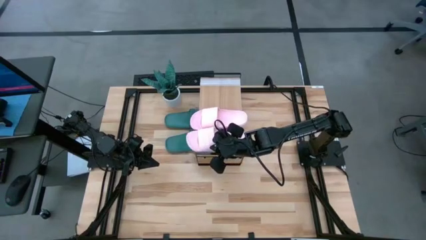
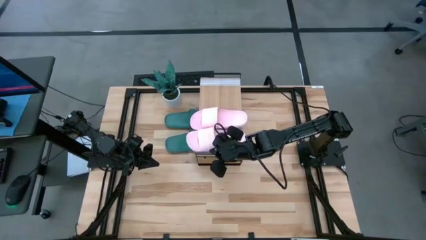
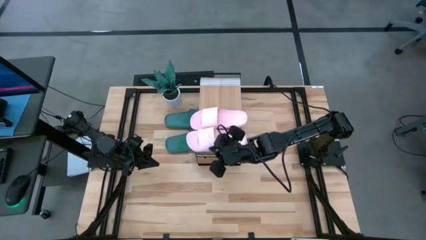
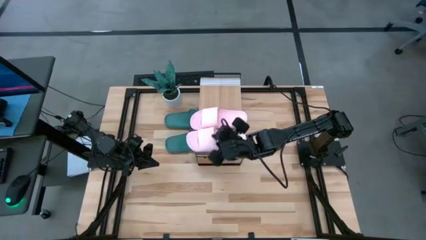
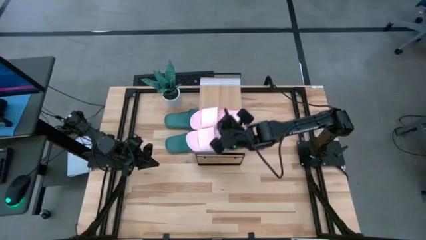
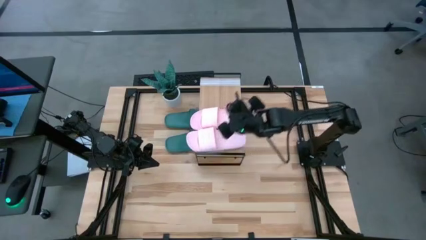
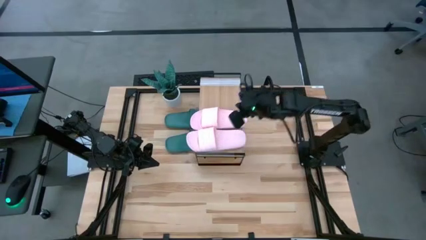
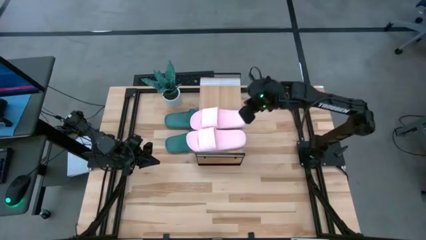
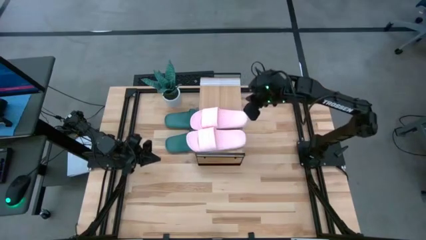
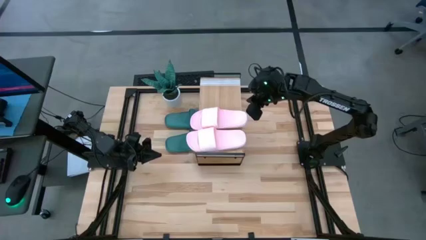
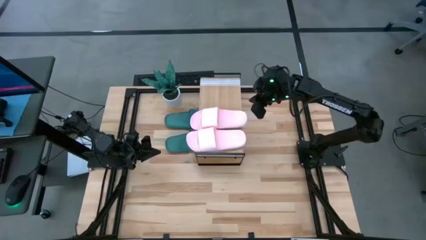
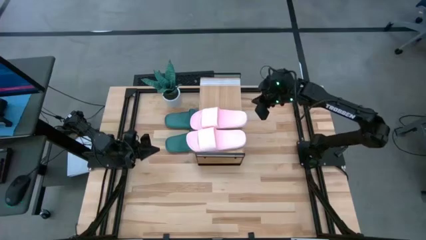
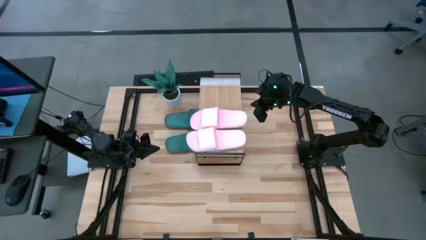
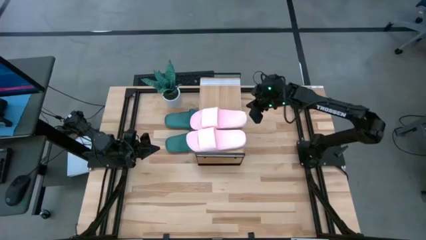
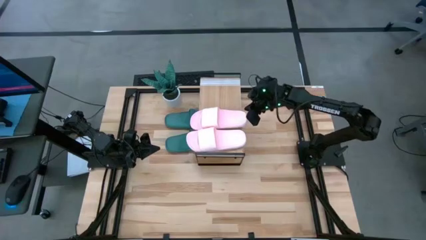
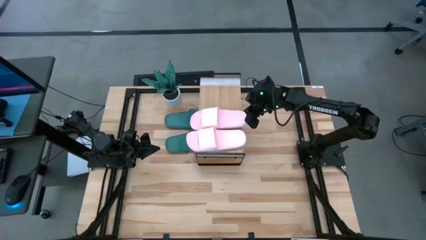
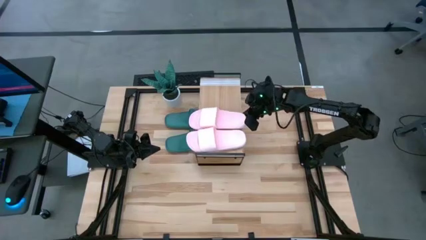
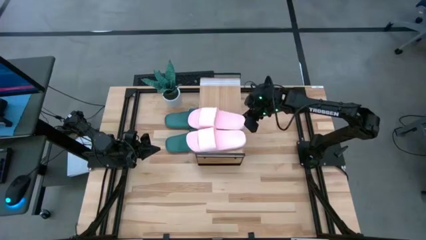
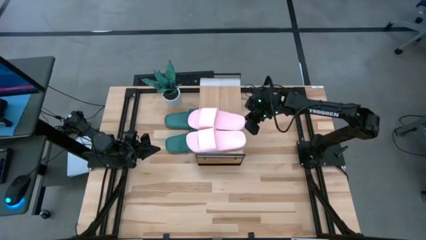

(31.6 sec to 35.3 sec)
Task: Pick and place slides into the shelf
Adjust the top pink slipper on the shelf

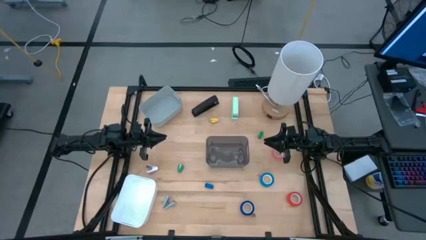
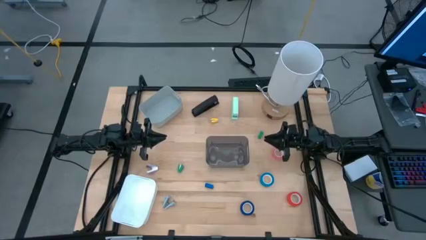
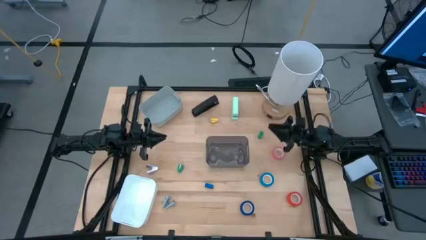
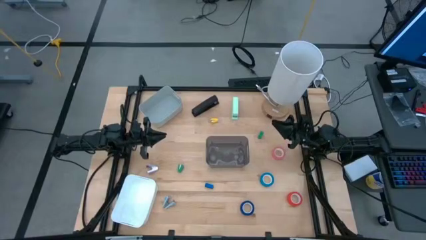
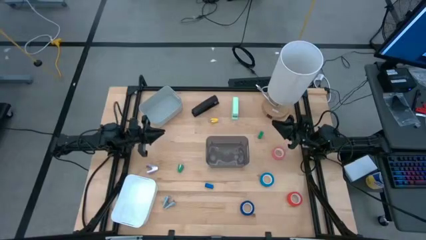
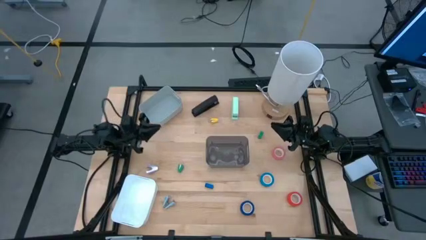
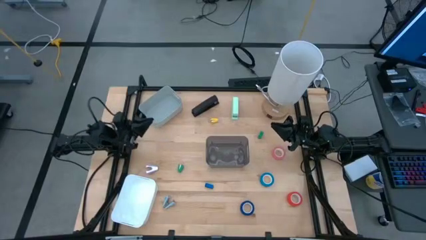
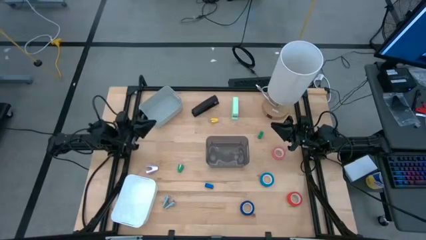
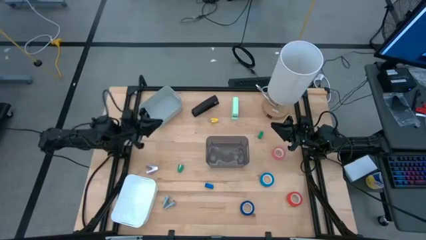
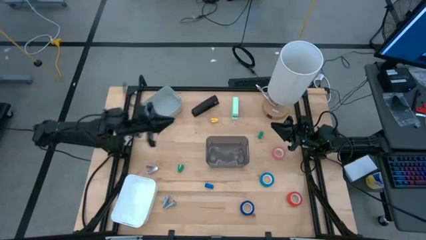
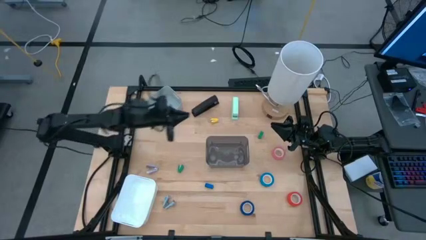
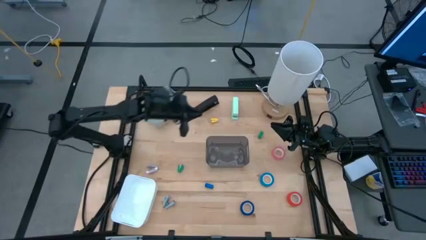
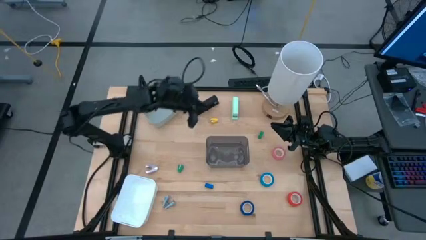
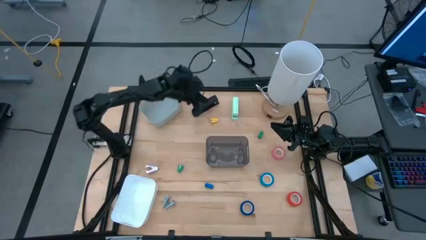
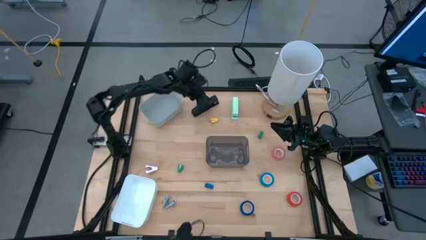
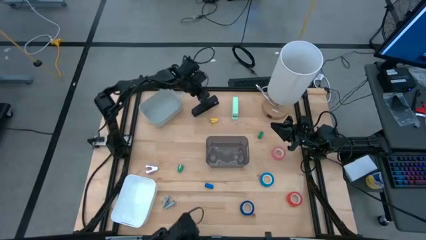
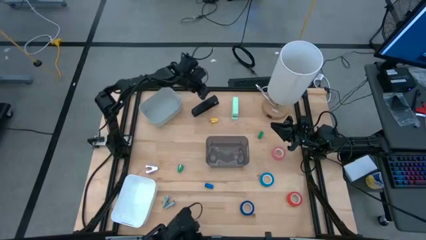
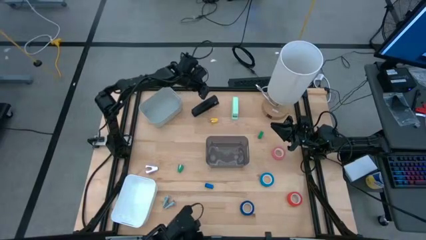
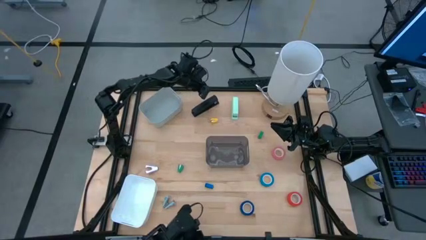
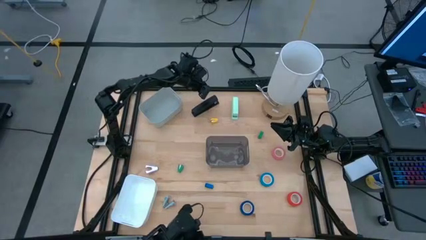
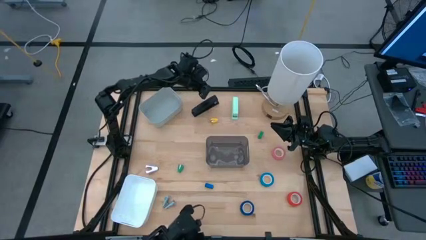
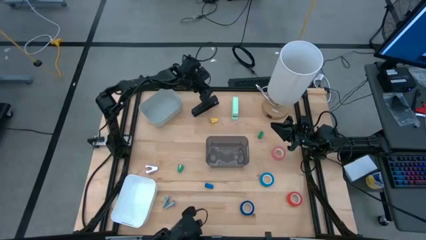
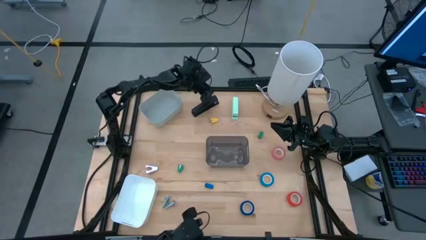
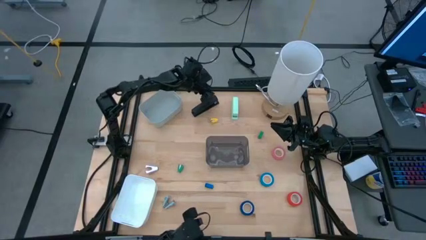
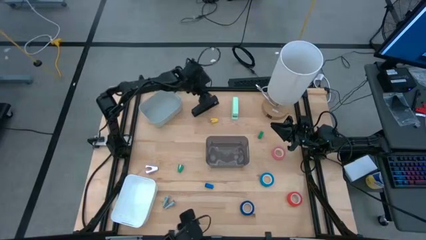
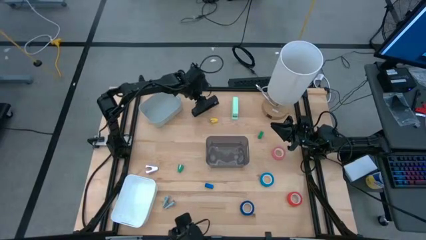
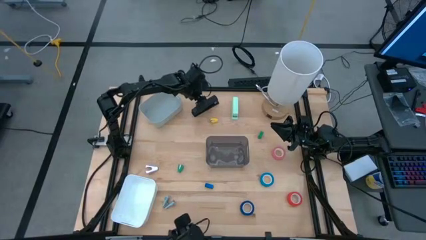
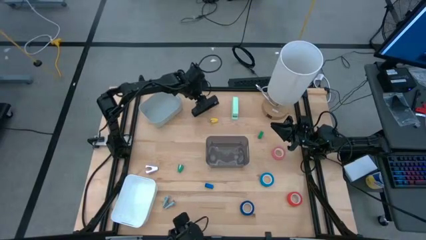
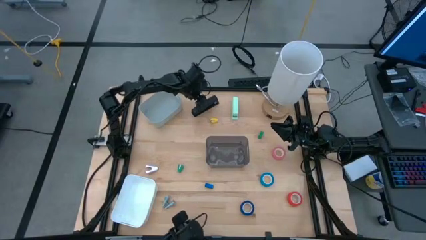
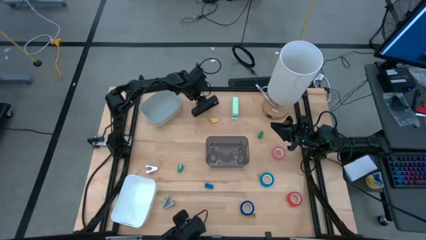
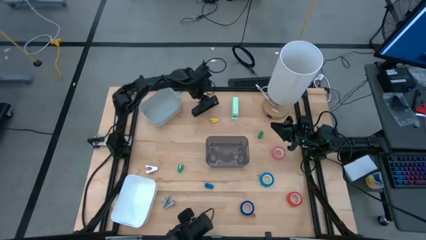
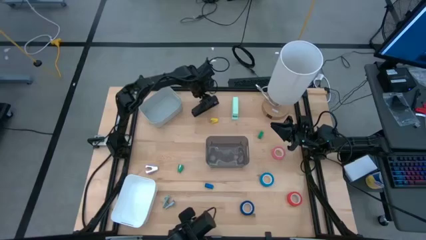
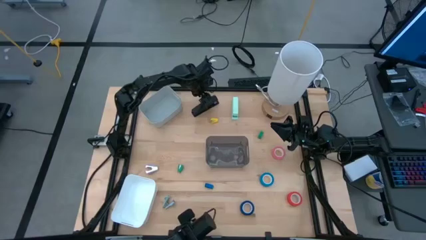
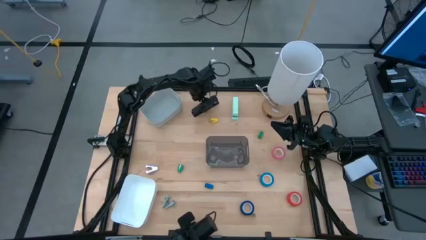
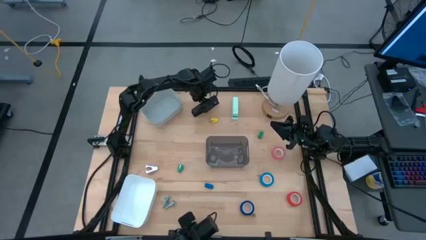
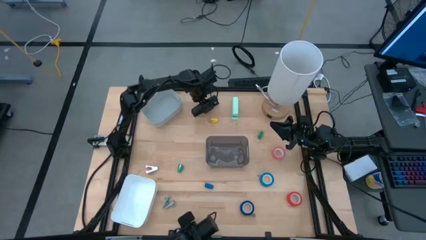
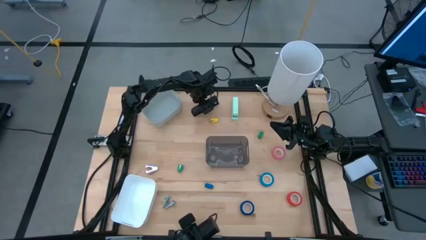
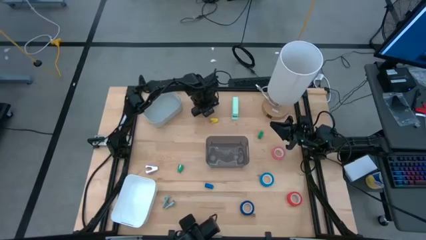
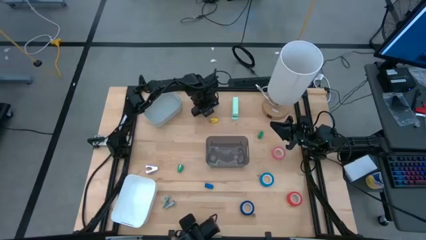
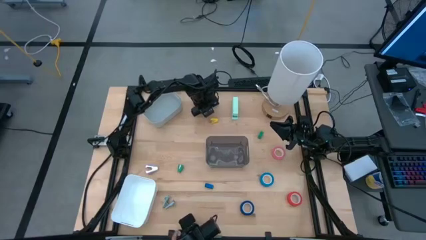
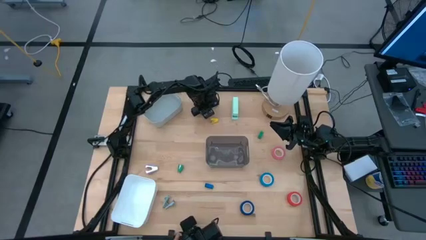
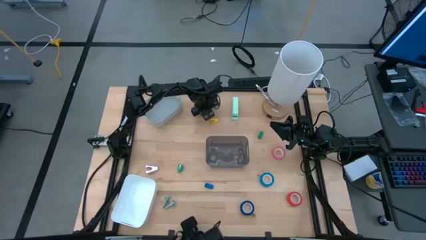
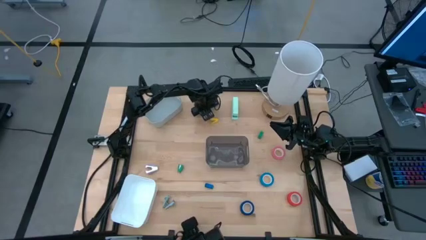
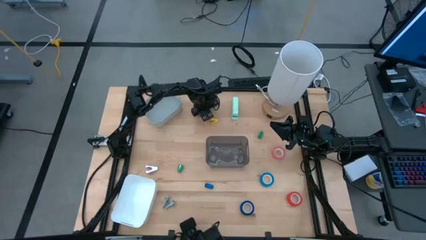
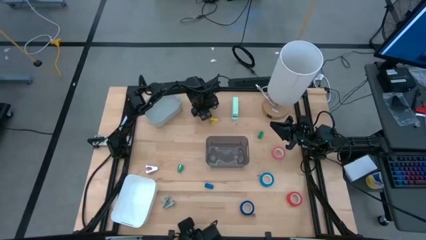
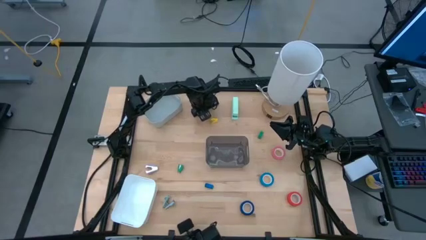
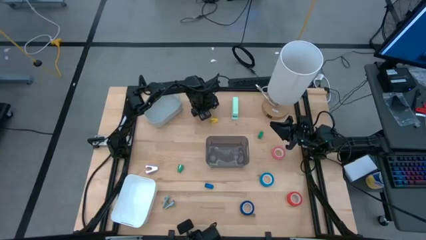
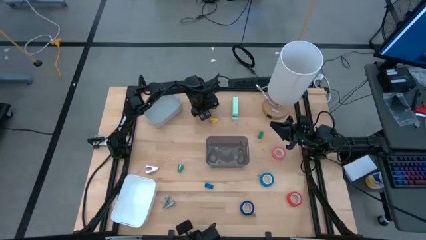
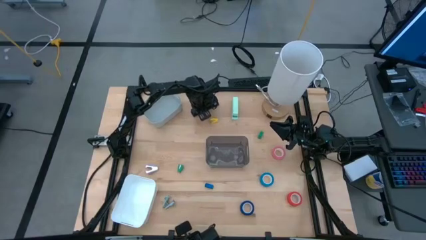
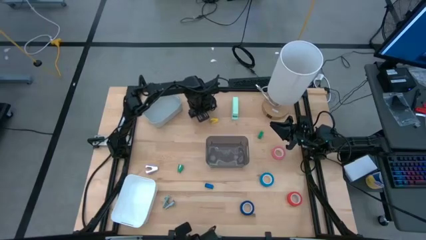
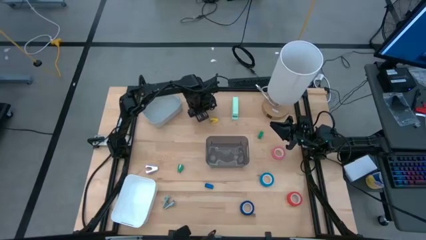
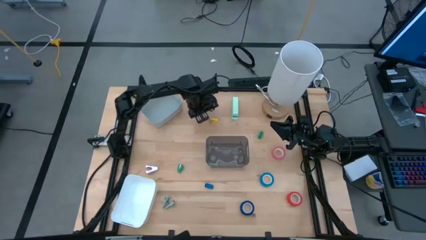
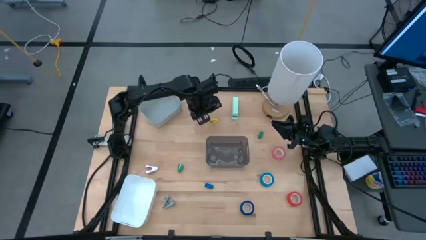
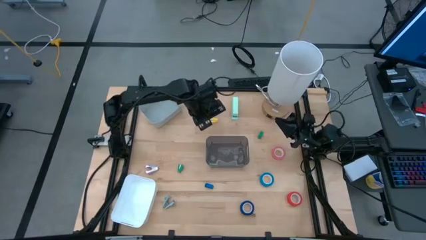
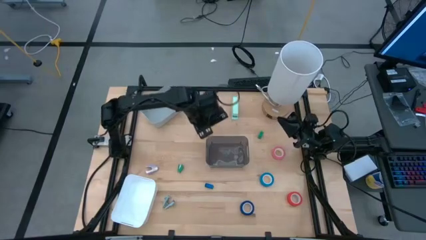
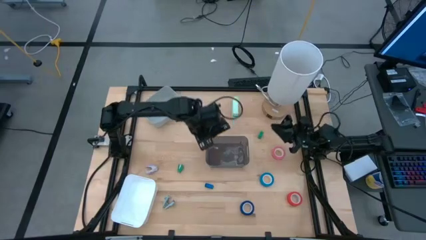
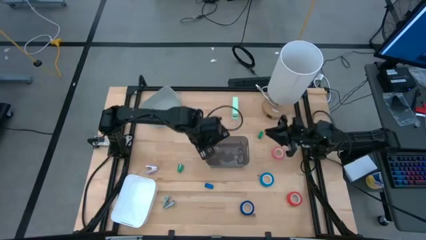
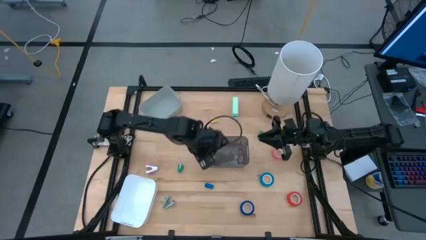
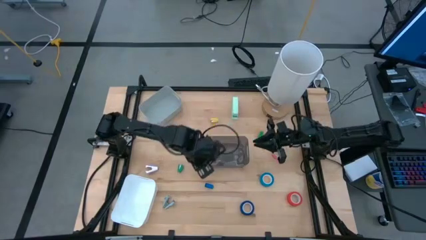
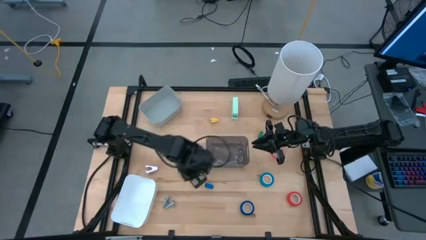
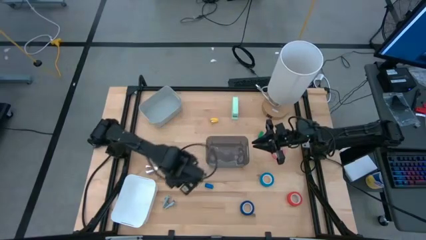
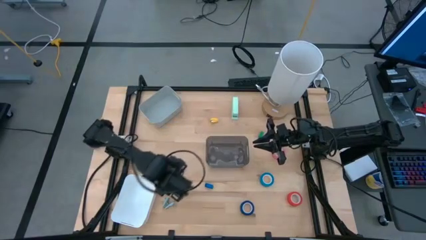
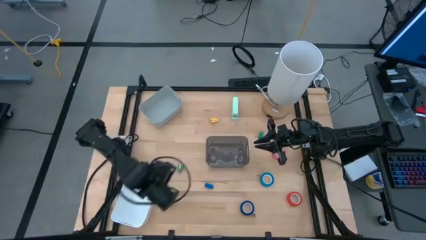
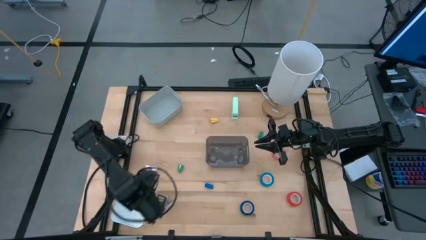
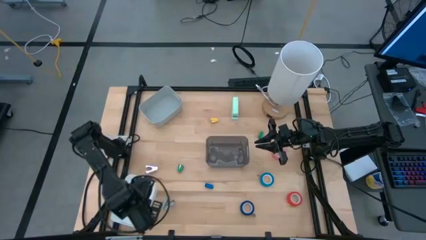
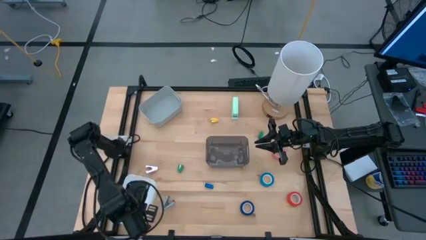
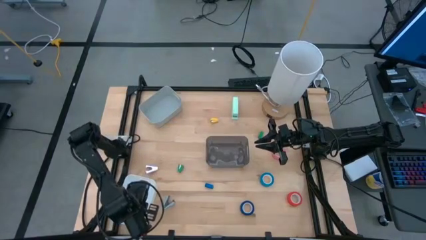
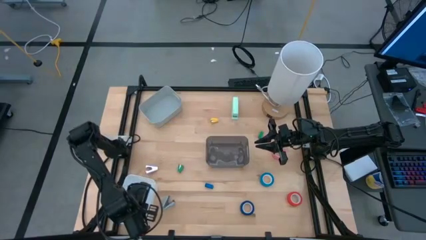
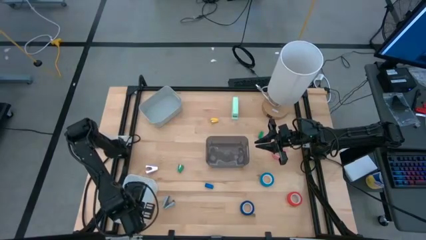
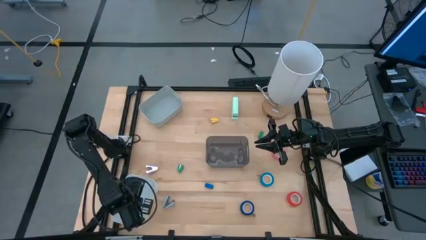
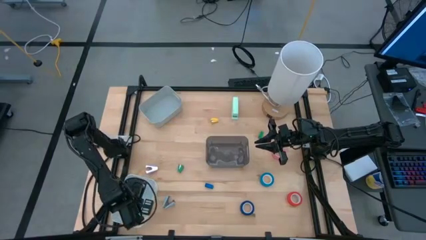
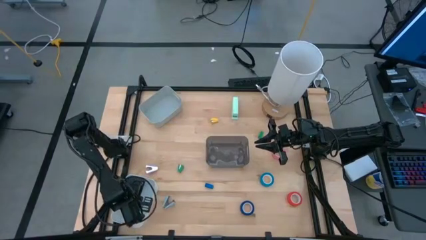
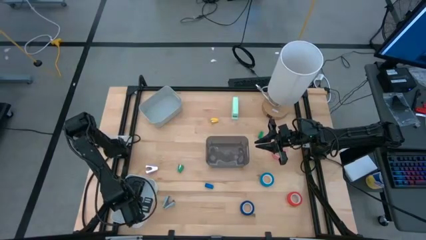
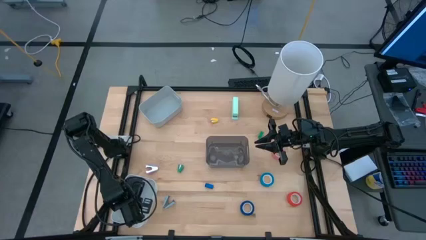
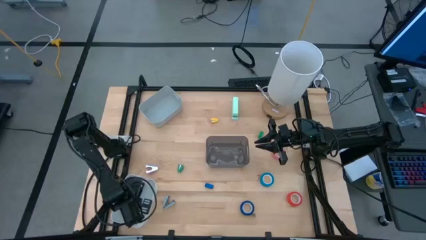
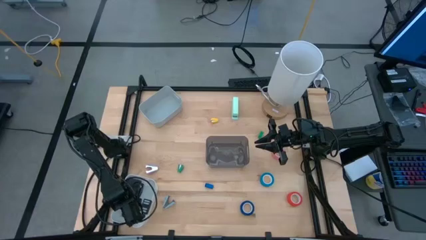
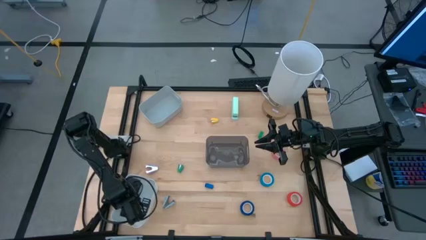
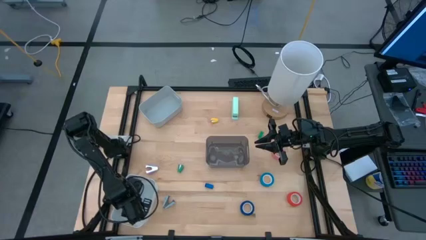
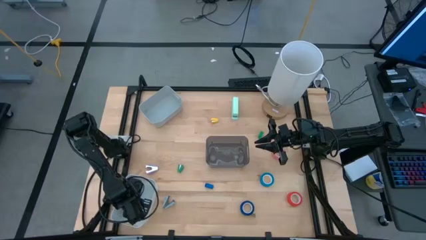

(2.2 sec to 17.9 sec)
Task: Pick and place Stapler, Stapler remover, tape
Put the large black stapler into the white bin
